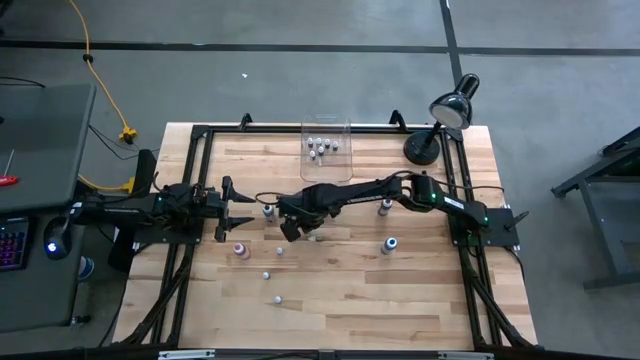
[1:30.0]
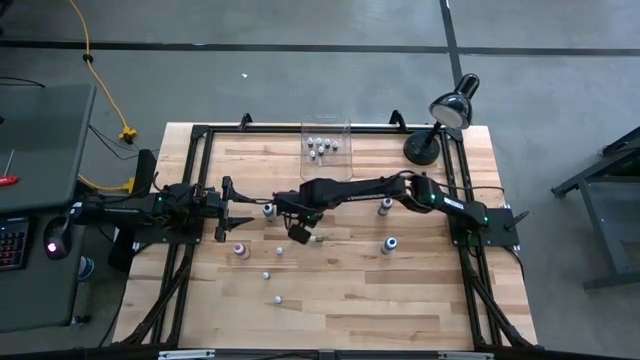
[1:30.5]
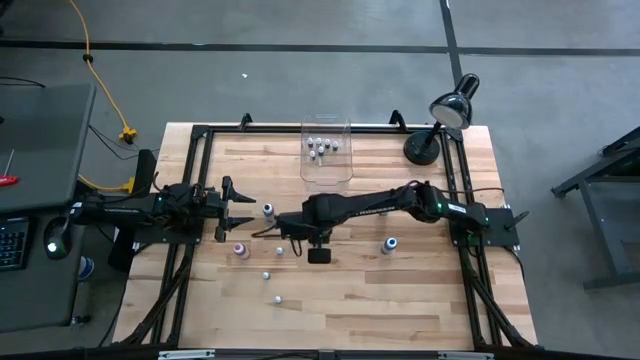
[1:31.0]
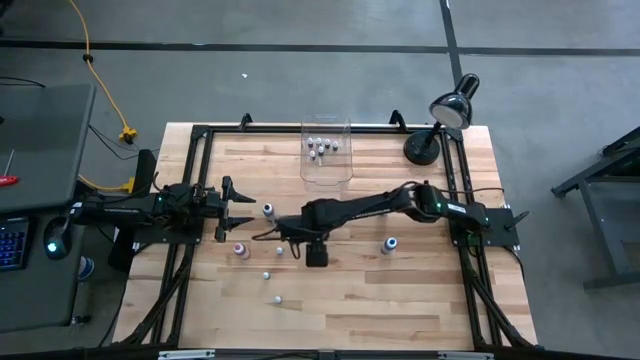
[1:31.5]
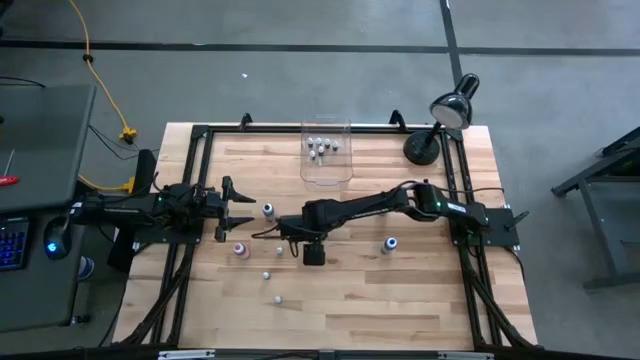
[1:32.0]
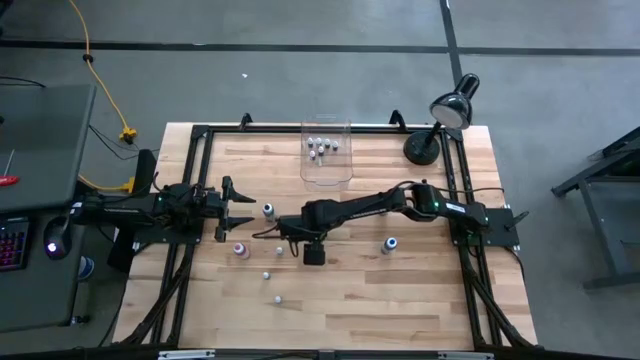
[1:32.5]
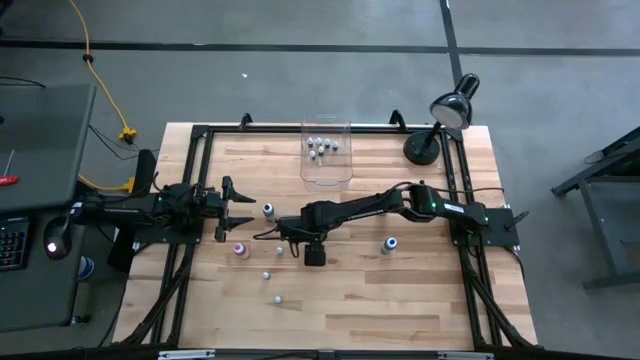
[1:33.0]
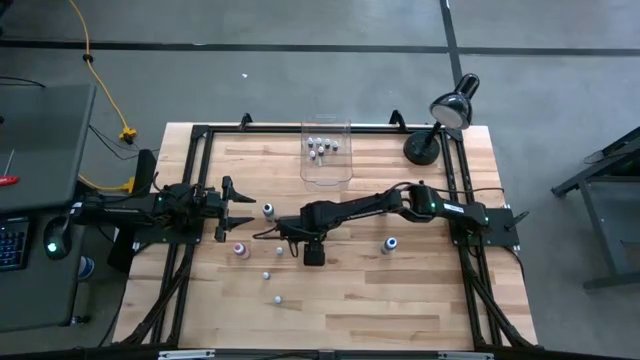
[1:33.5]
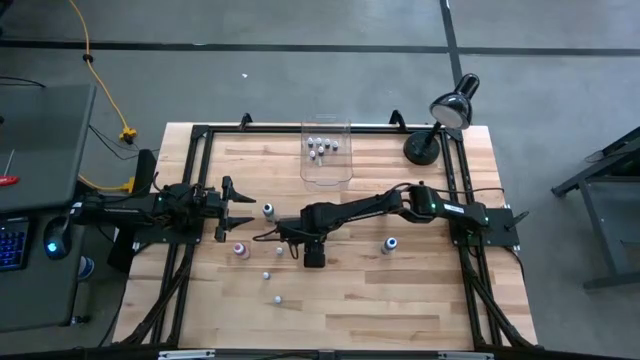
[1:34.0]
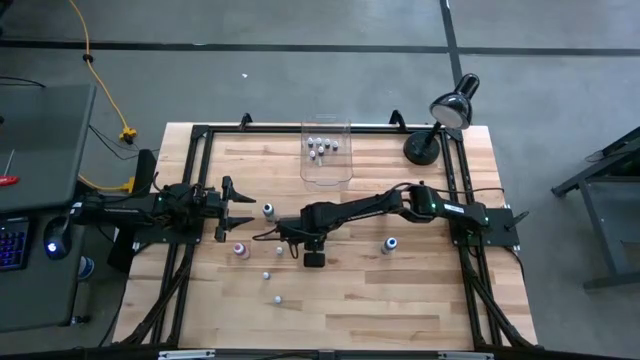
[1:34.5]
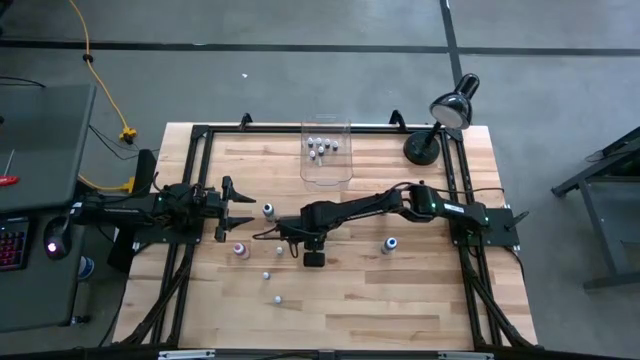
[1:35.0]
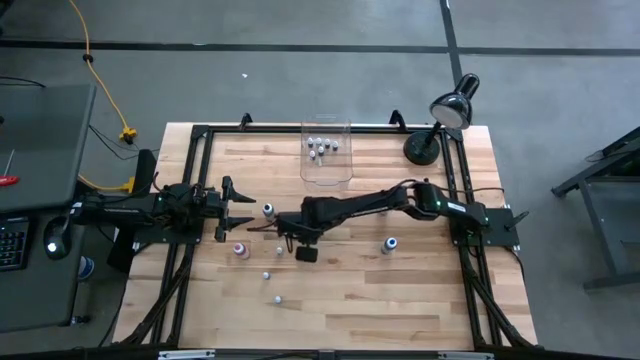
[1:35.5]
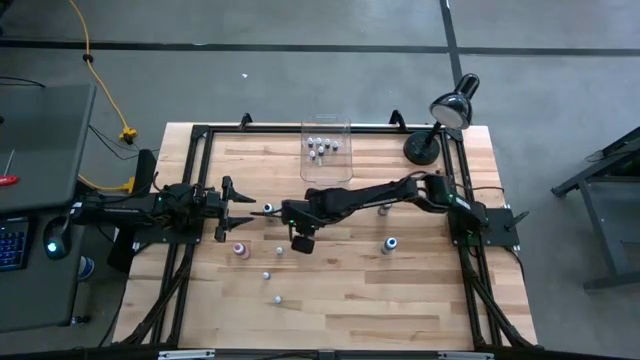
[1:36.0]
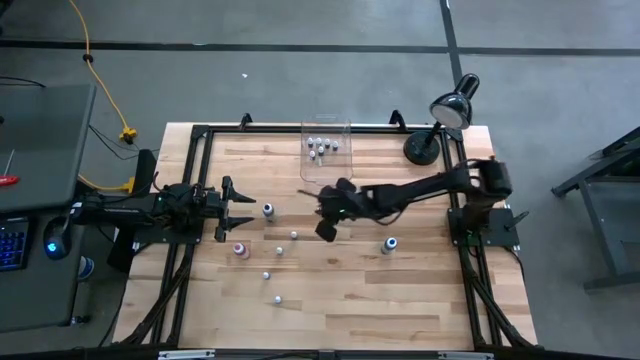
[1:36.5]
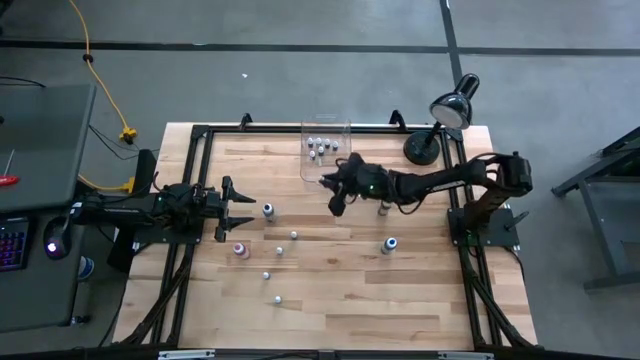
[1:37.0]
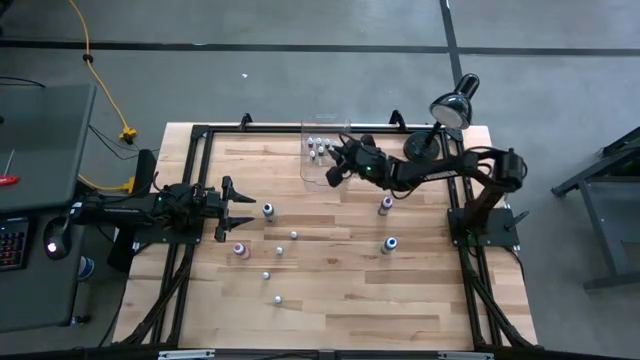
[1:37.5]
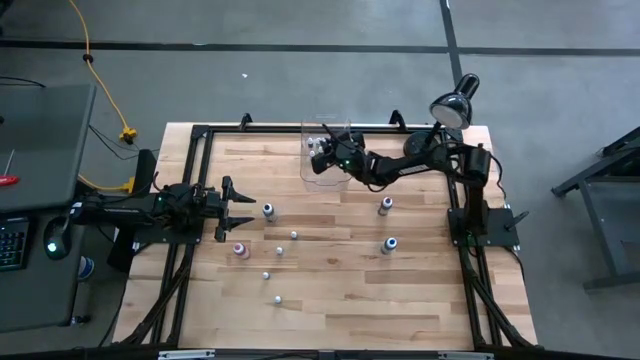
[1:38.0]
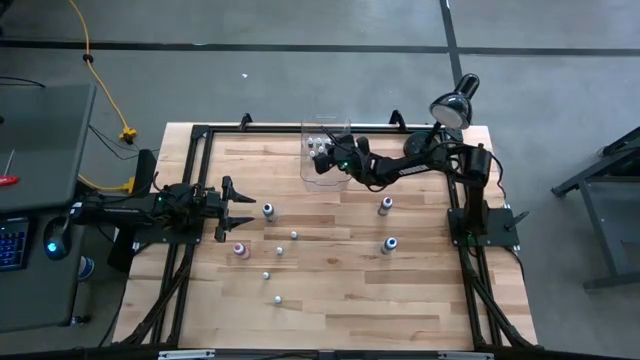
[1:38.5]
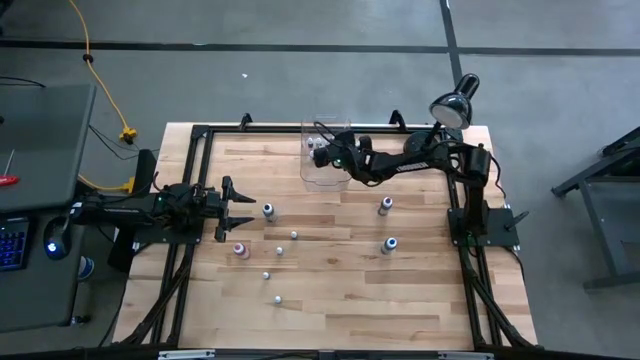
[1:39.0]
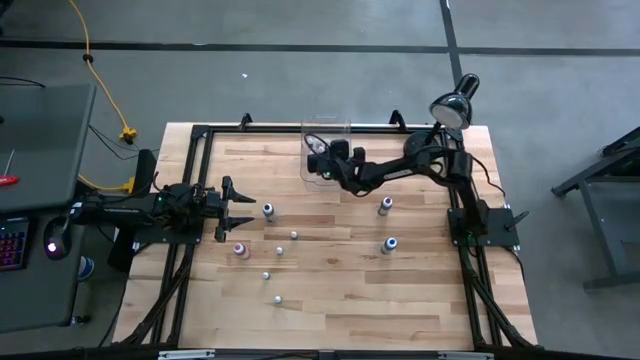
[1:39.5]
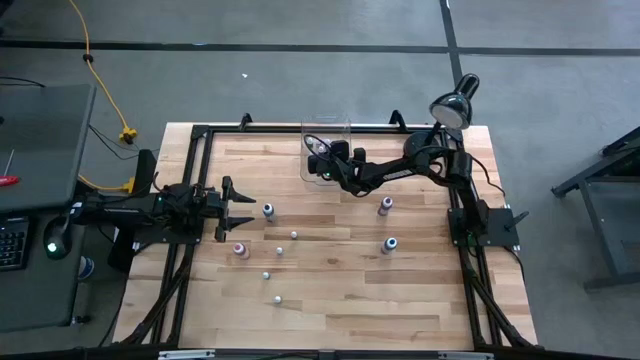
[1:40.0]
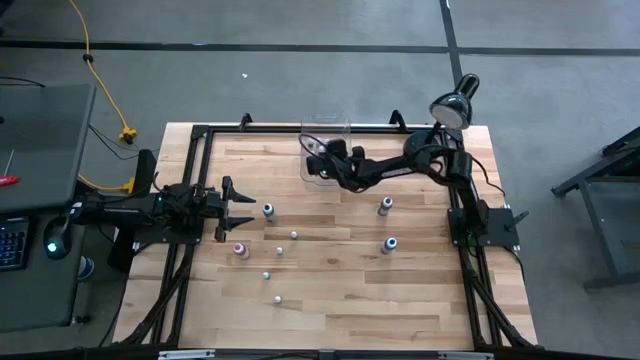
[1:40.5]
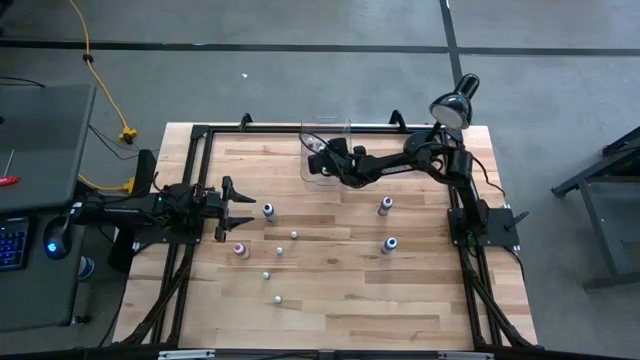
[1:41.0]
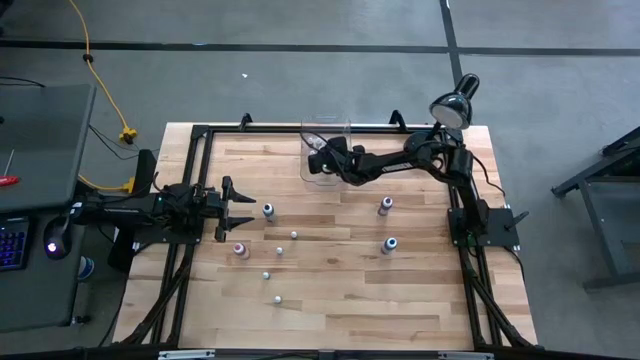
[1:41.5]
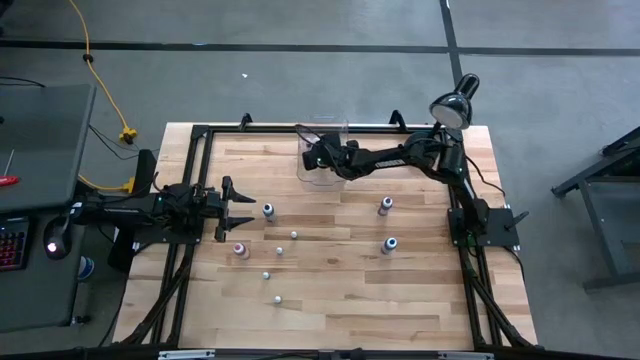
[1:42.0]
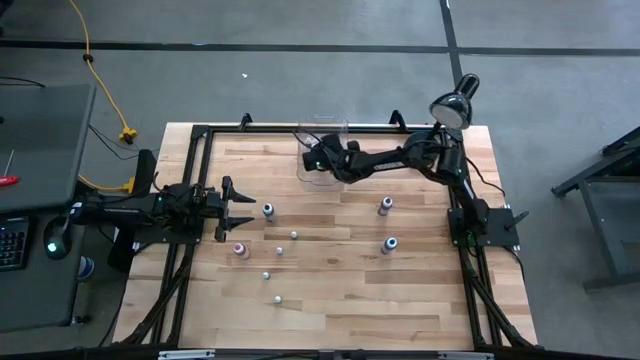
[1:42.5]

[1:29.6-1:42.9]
Task: Pick & Place food coloring
Put the small food coloring bottle into the transparent bin

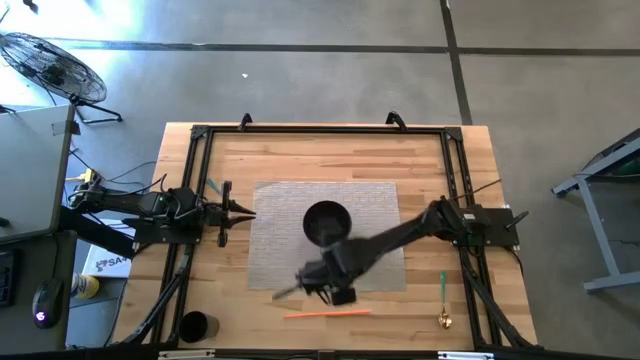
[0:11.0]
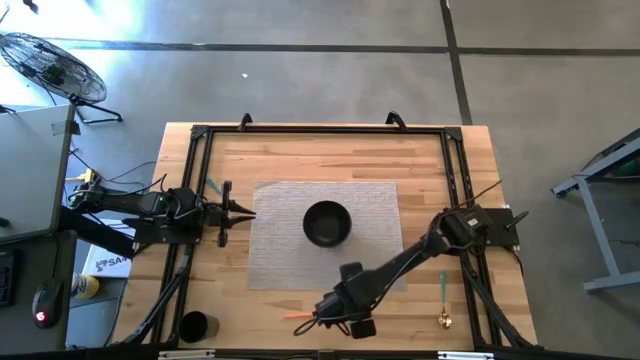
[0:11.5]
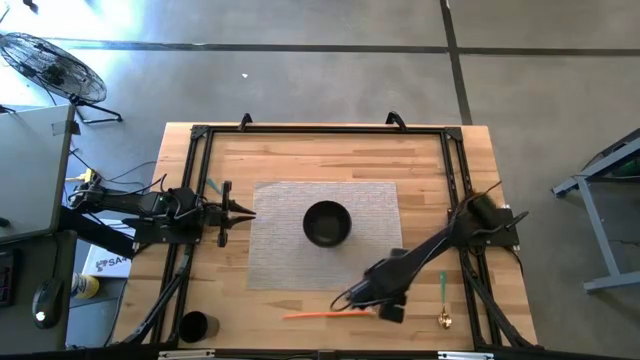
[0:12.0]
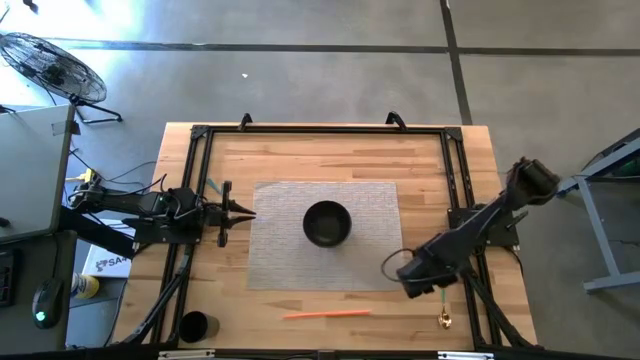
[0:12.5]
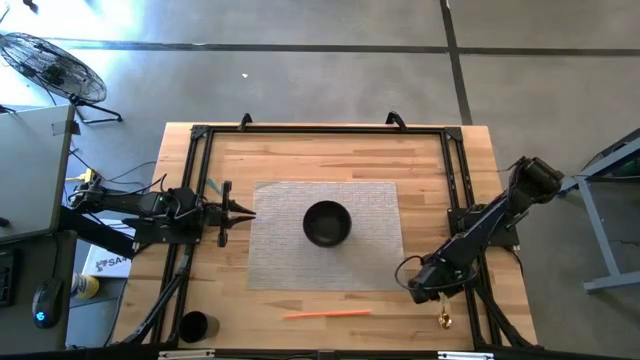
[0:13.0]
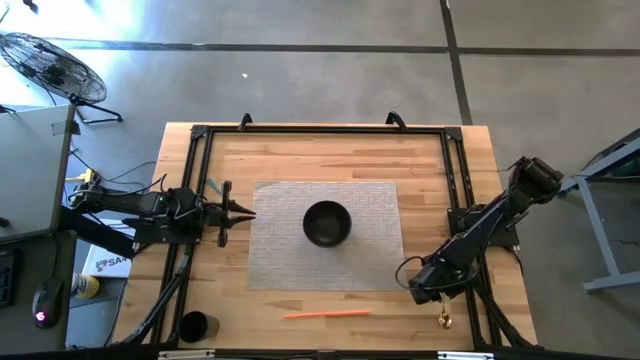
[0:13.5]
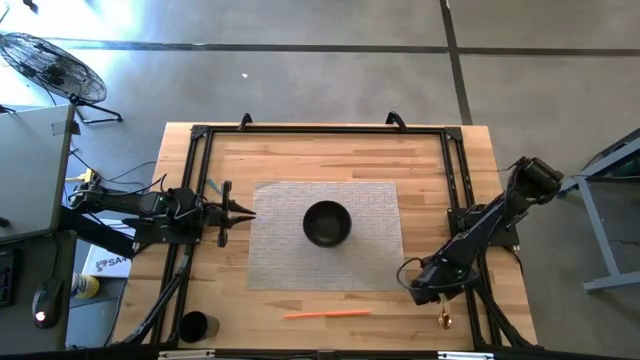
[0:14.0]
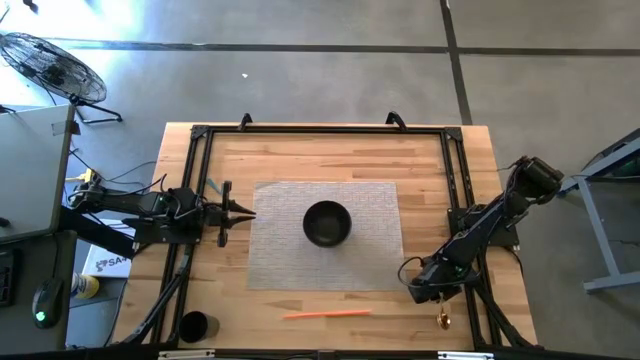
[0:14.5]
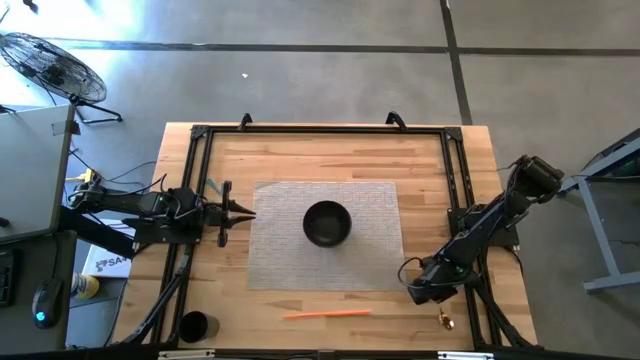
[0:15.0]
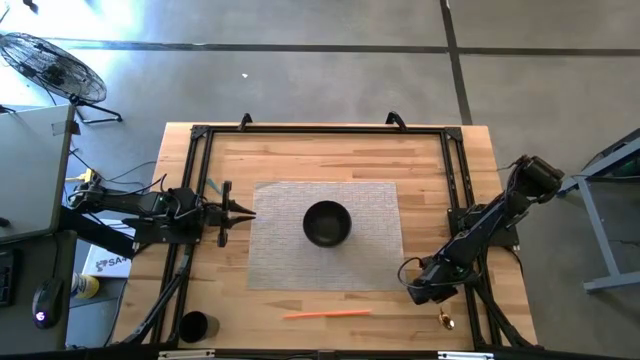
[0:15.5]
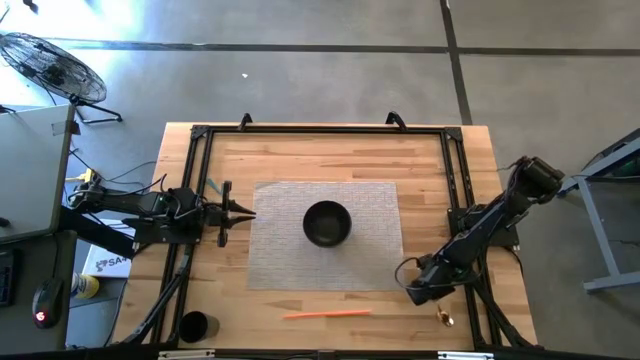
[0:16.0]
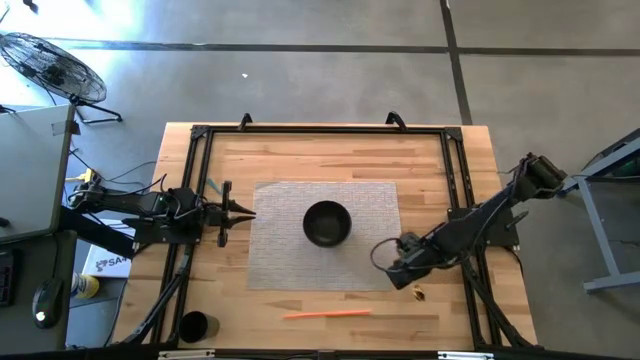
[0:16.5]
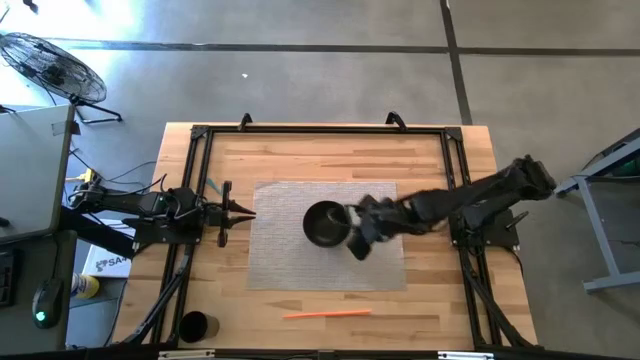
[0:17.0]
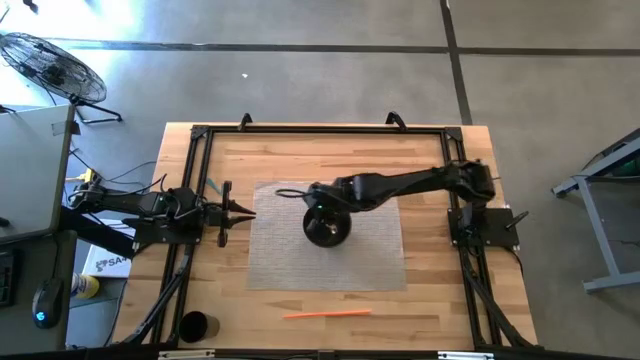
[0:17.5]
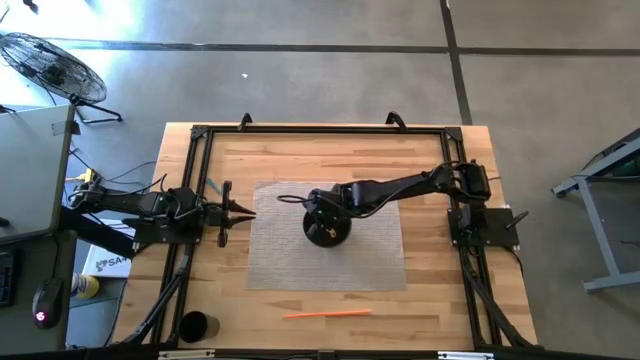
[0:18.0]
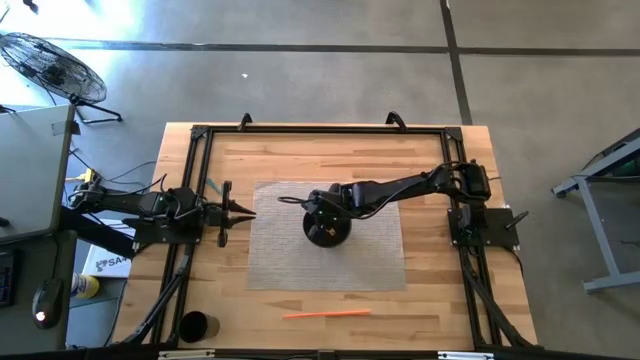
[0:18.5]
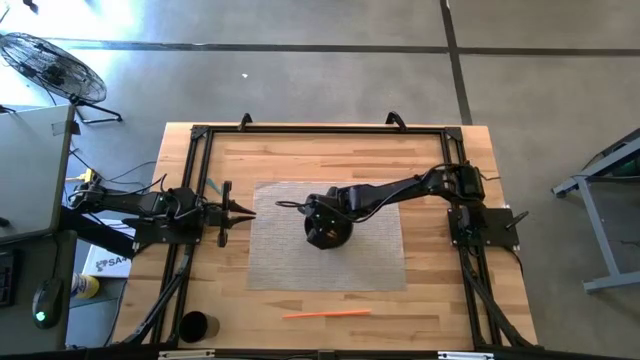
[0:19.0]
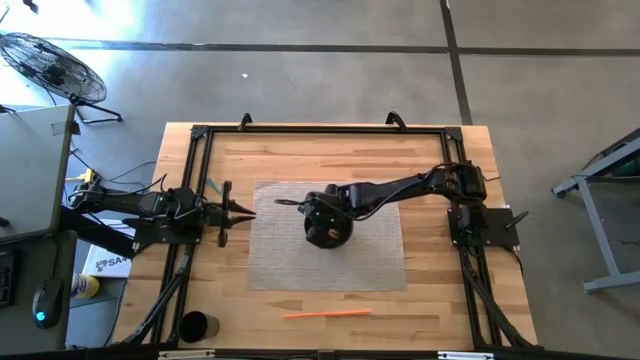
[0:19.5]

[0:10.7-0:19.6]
Task: Pick & Place Utensil
Put the green spoon into the black bowl on the gray mat
